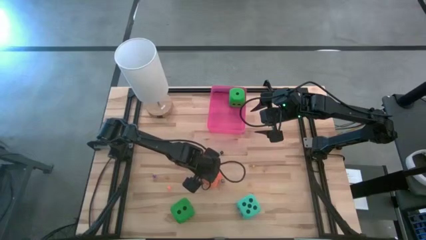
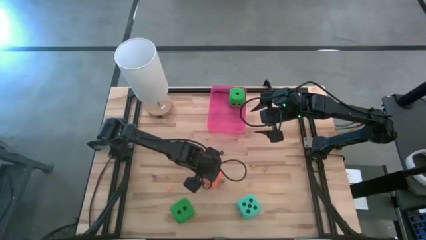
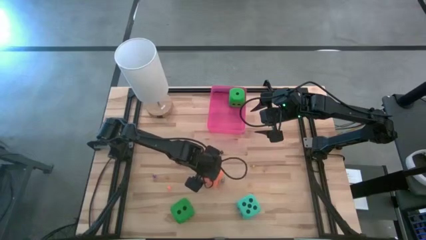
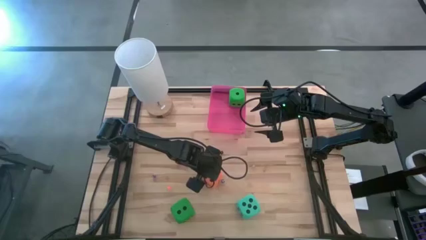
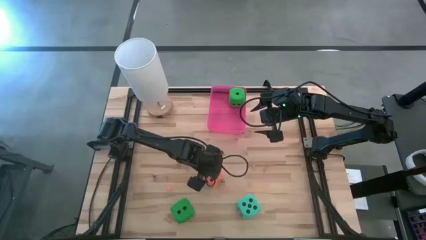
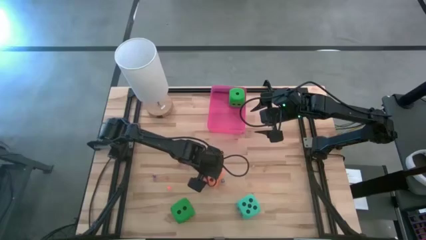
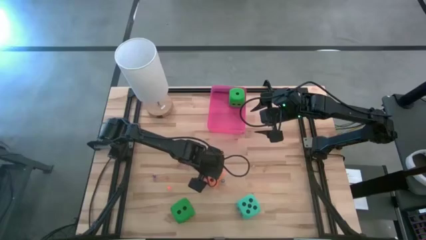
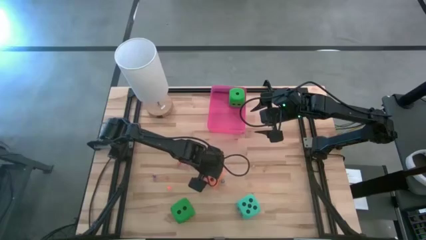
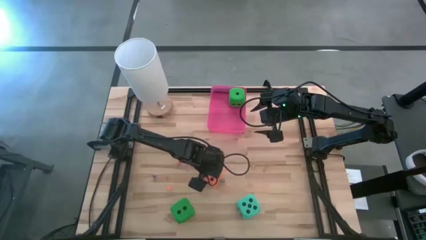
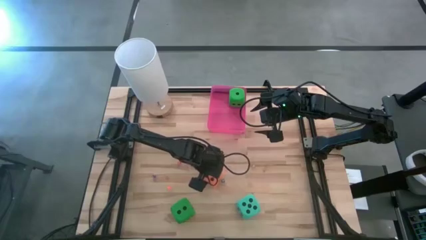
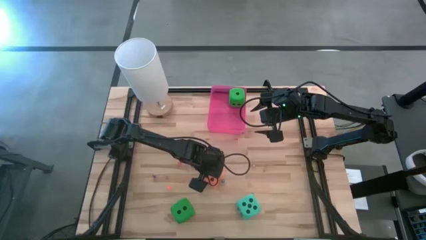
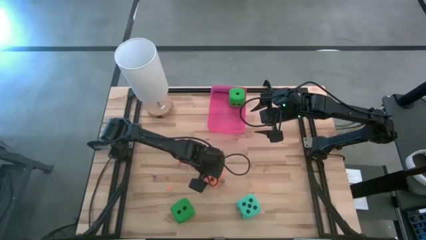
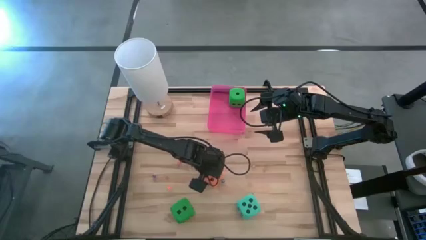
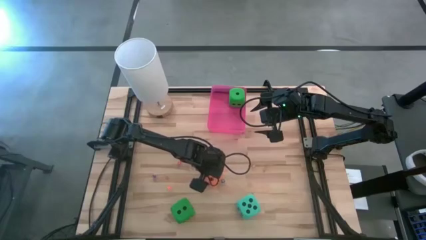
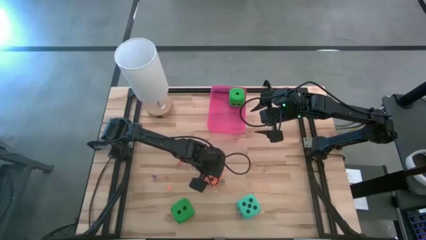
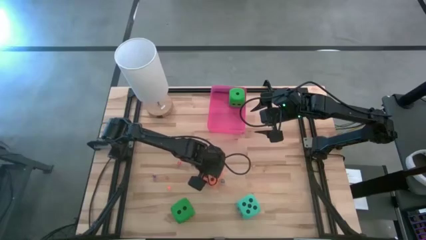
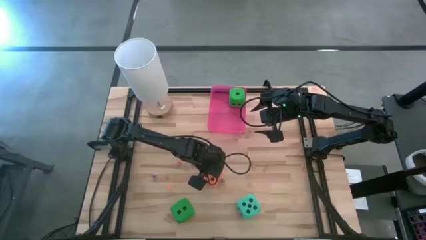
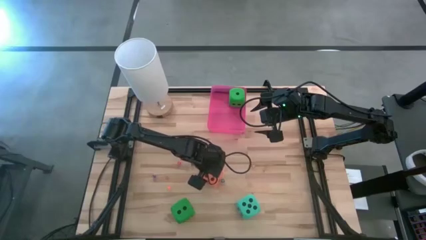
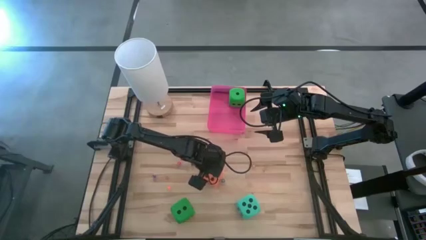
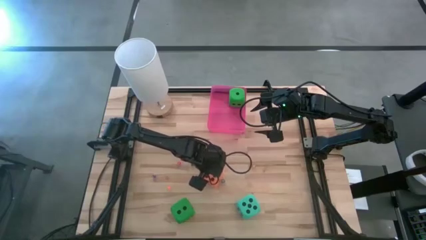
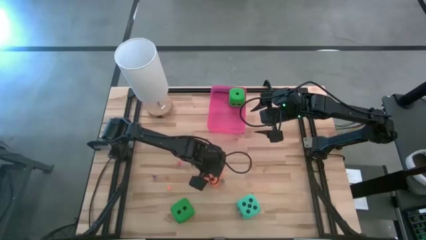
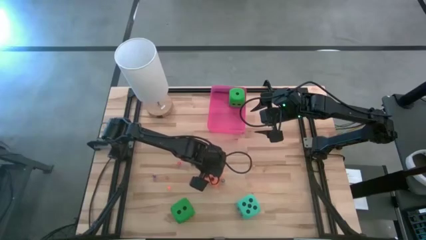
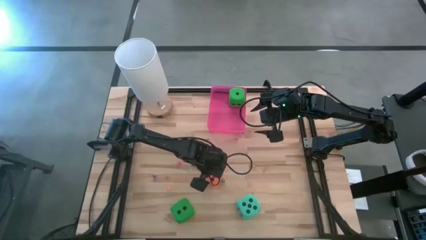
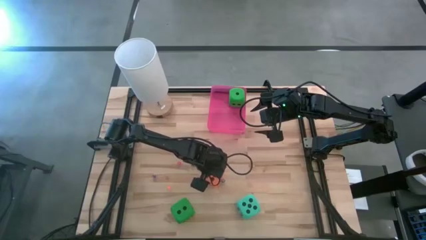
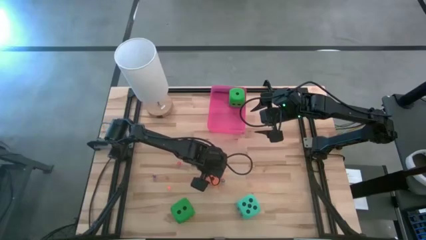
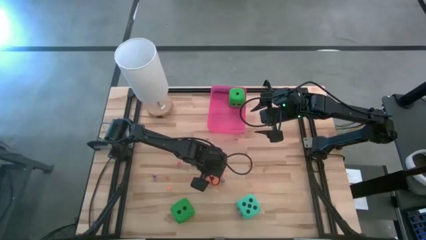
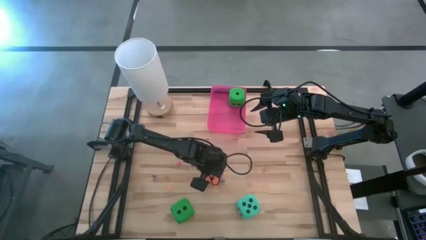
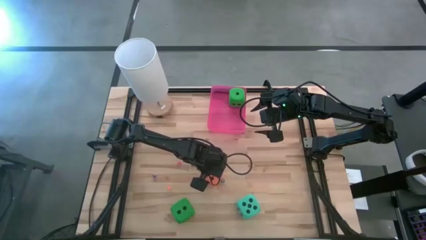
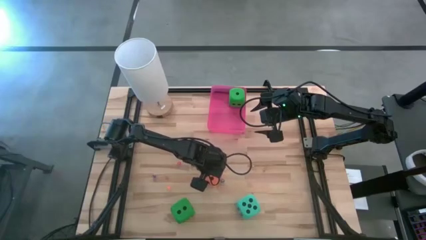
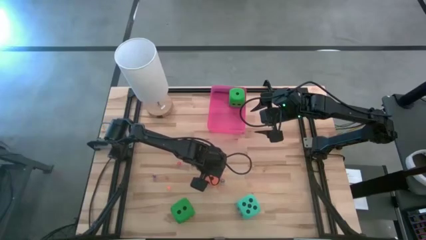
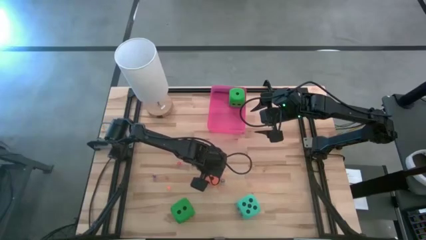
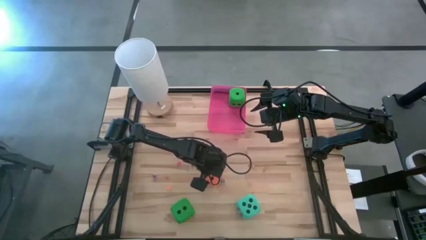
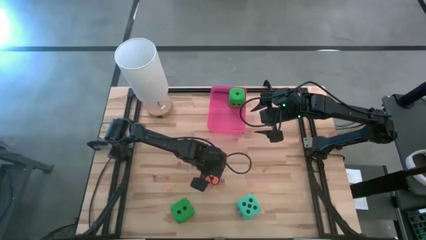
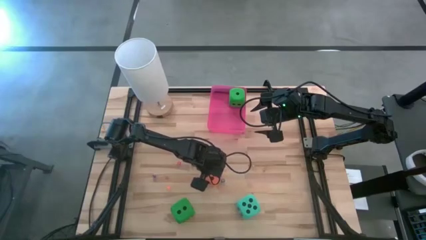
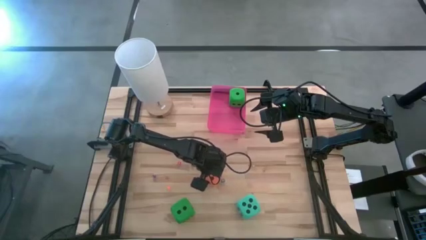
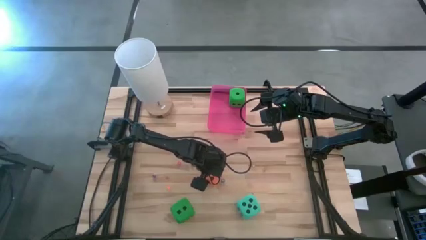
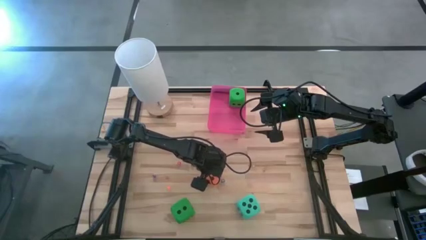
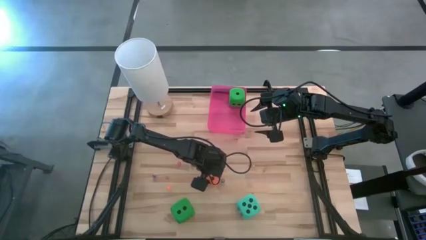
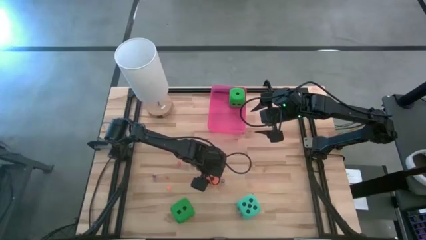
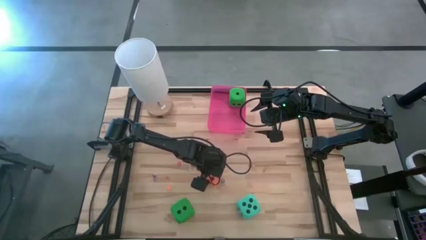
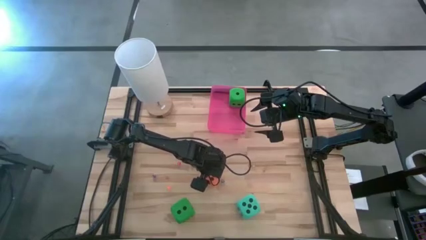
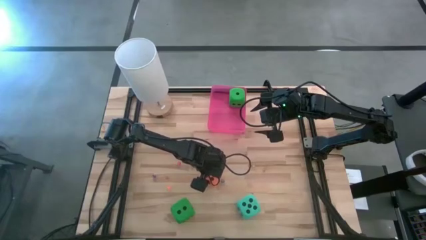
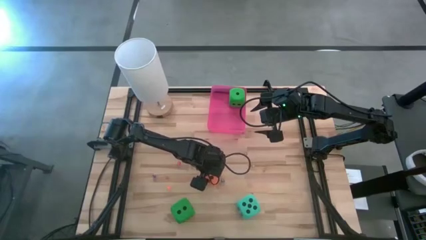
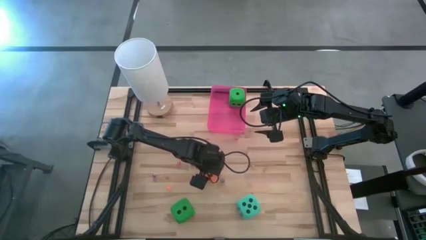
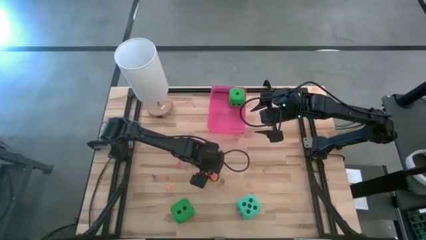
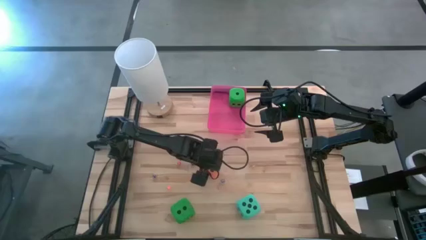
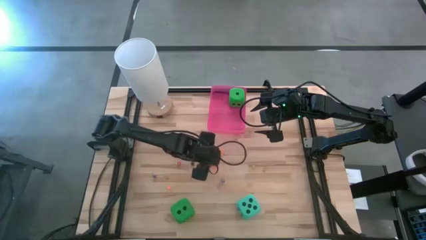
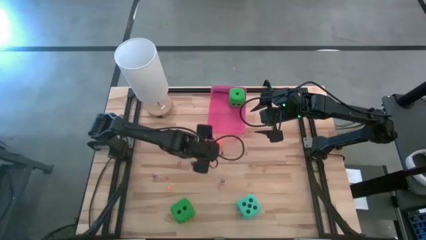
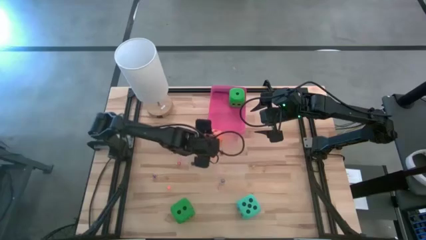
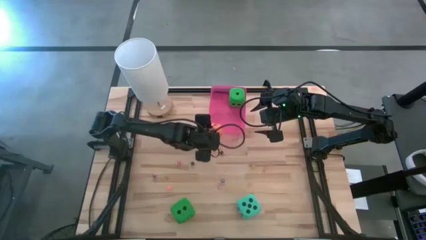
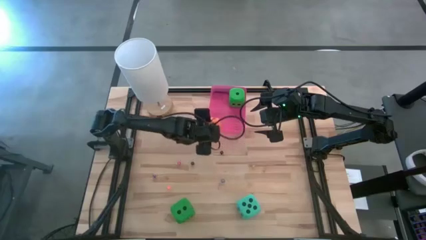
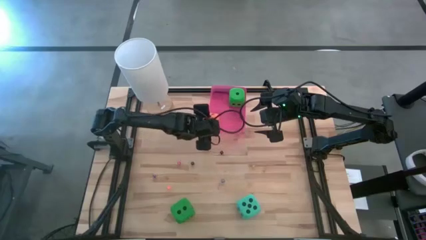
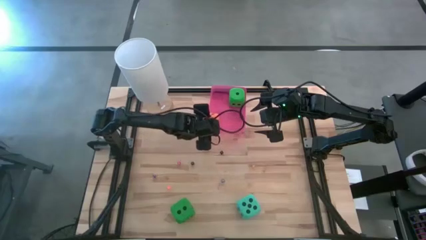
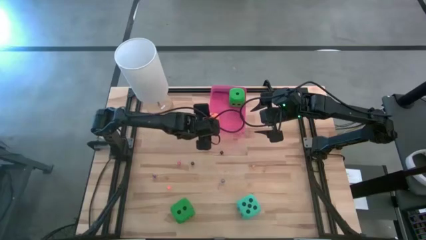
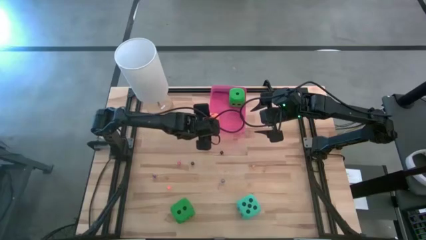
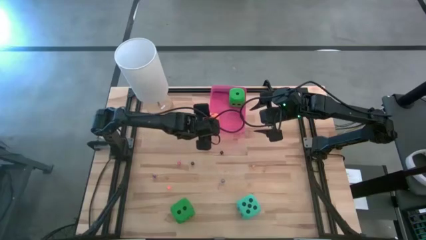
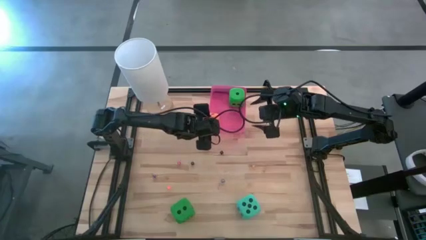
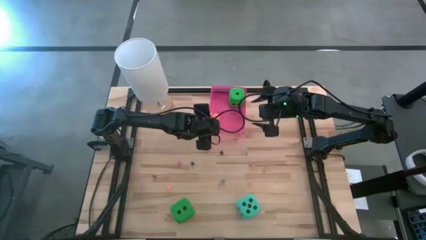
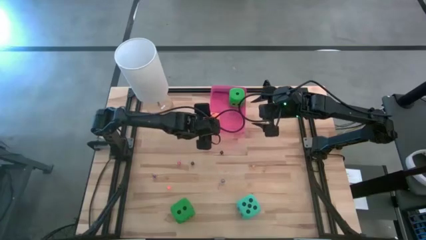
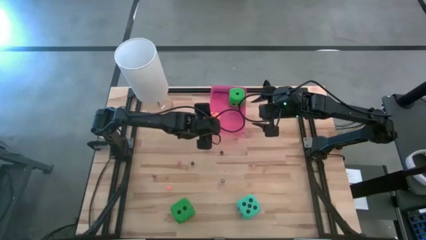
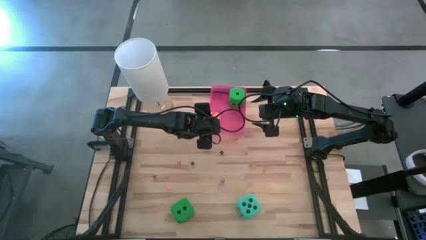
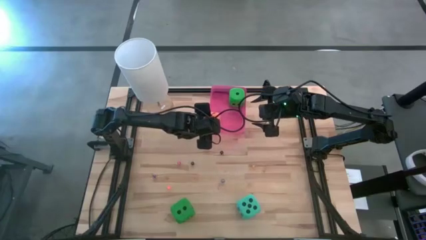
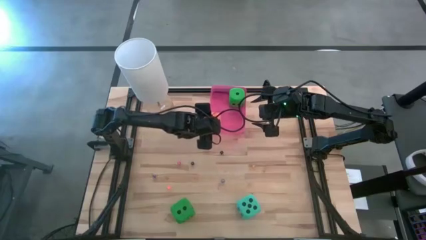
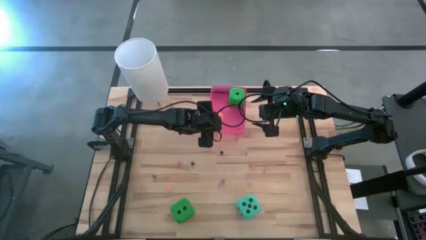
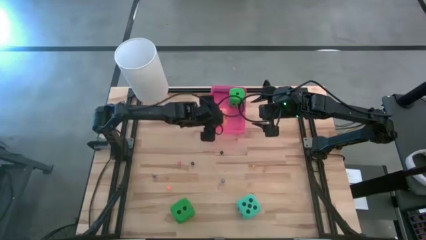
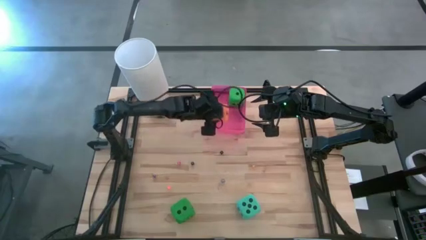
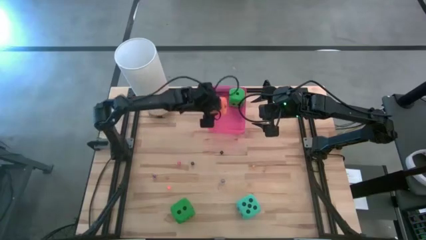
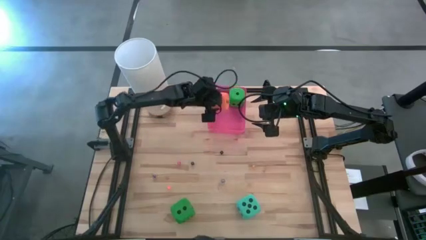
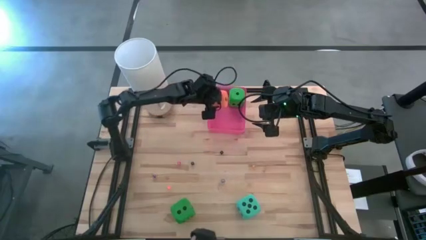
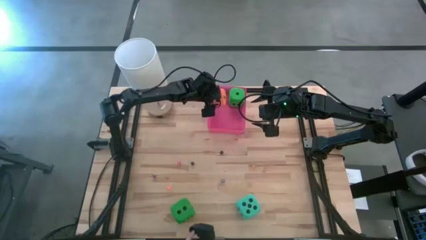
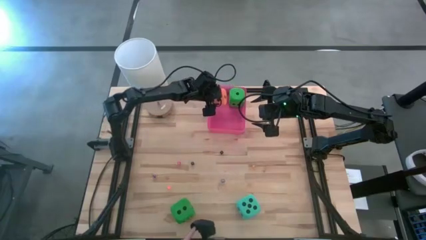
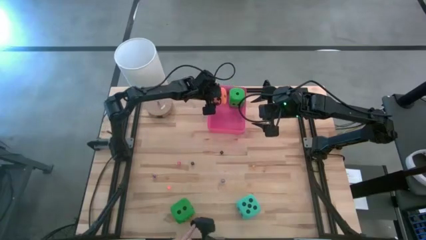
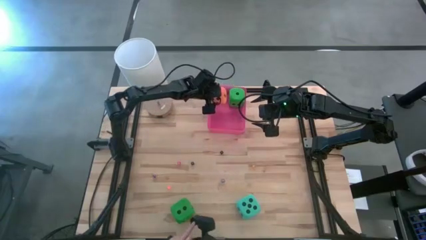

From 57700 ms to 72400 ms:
Task: Pick & Place Dice
Put the big orange dice into the red container
